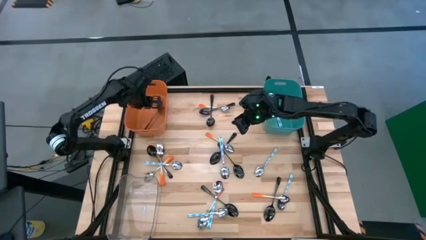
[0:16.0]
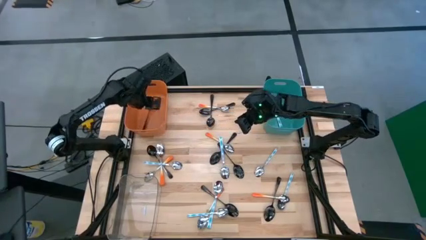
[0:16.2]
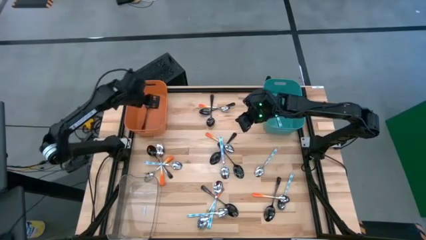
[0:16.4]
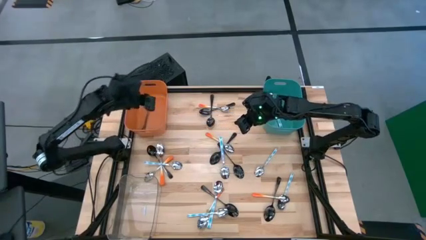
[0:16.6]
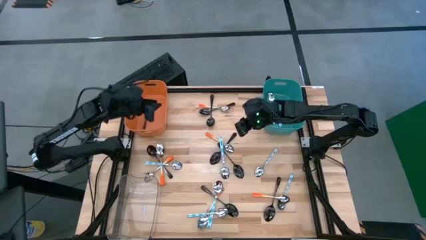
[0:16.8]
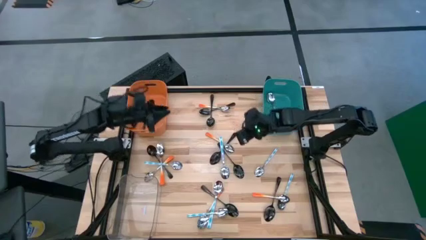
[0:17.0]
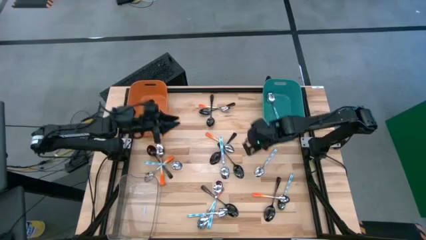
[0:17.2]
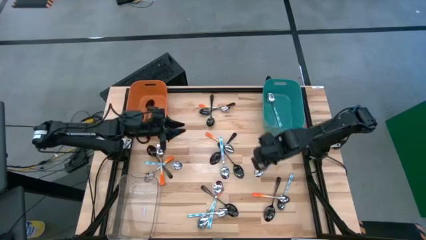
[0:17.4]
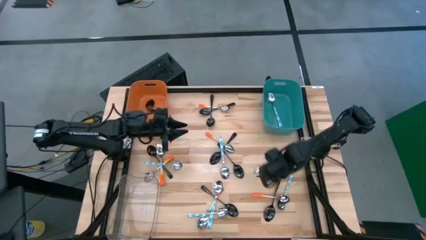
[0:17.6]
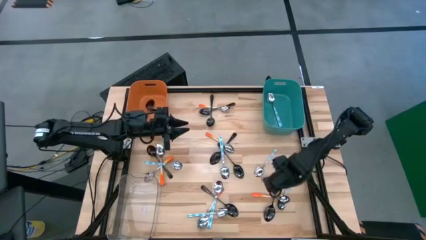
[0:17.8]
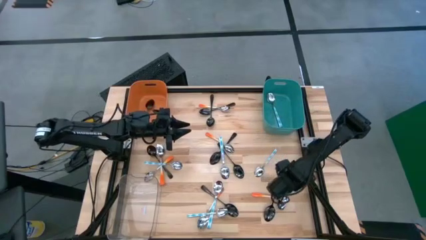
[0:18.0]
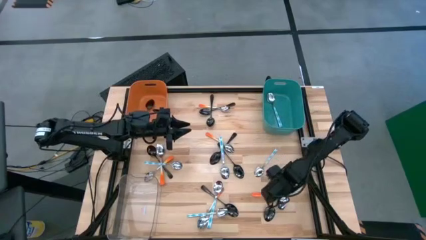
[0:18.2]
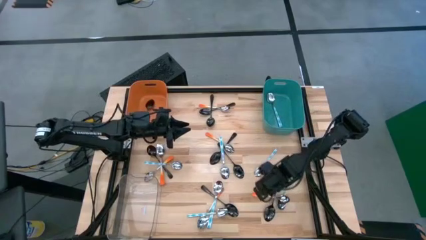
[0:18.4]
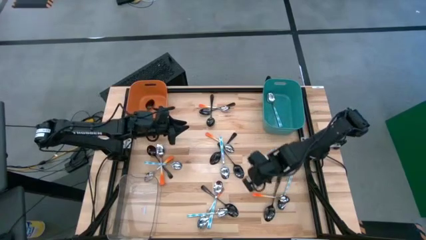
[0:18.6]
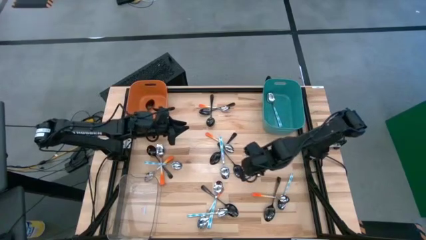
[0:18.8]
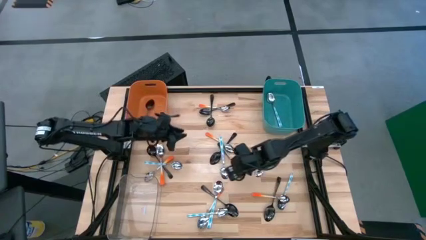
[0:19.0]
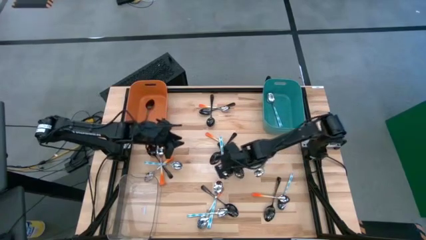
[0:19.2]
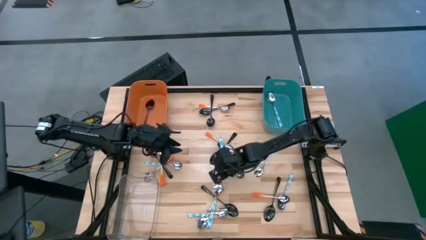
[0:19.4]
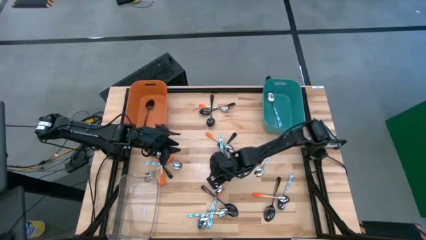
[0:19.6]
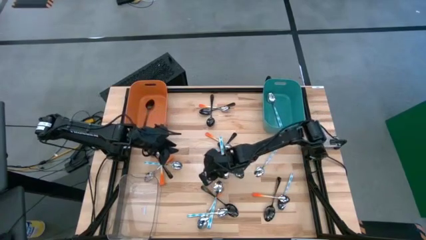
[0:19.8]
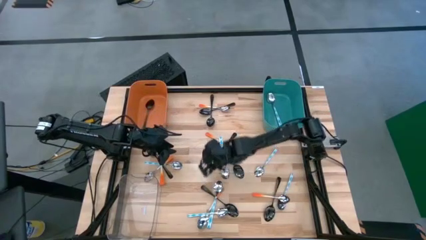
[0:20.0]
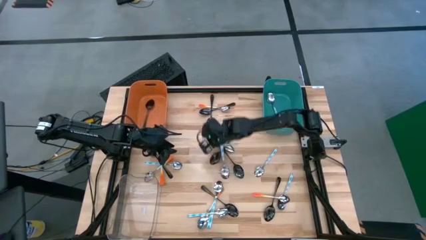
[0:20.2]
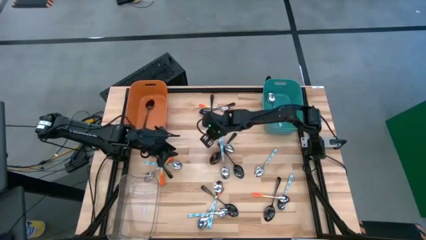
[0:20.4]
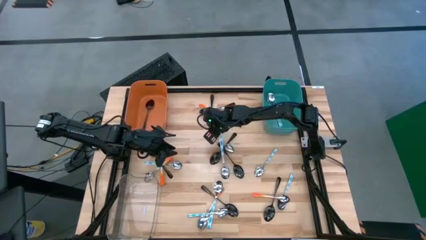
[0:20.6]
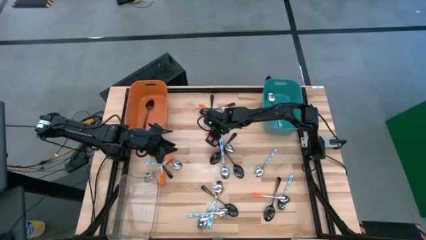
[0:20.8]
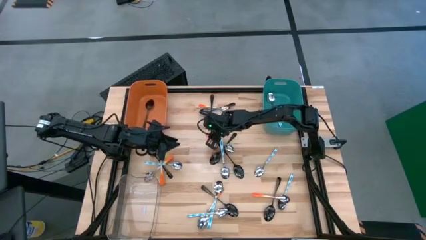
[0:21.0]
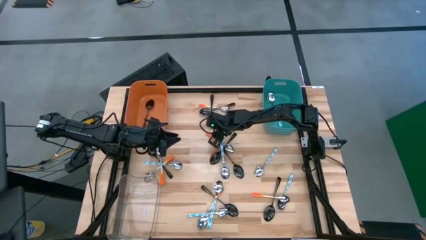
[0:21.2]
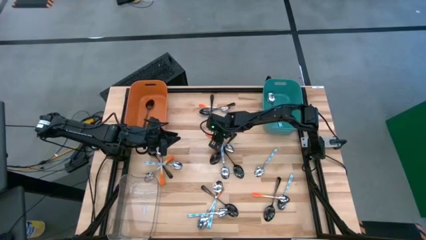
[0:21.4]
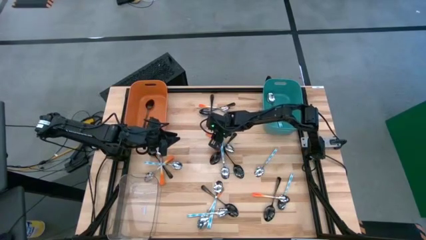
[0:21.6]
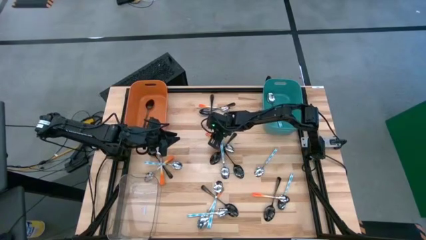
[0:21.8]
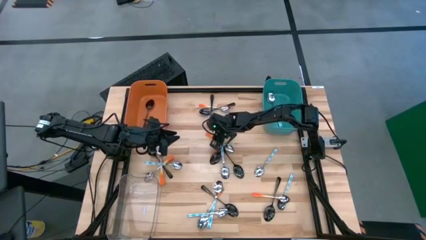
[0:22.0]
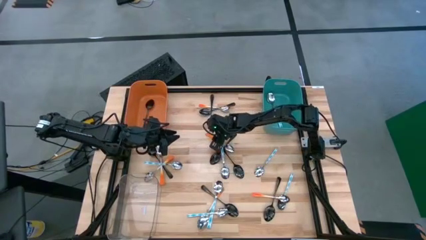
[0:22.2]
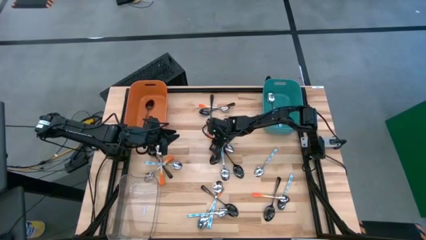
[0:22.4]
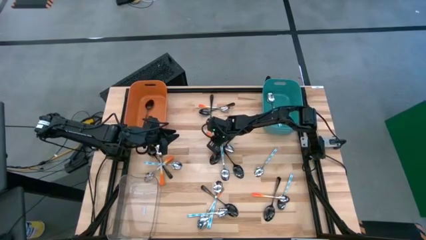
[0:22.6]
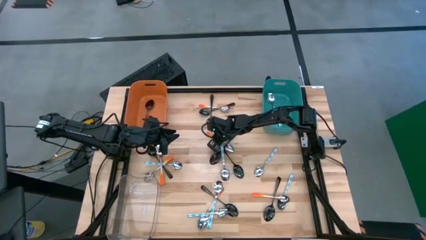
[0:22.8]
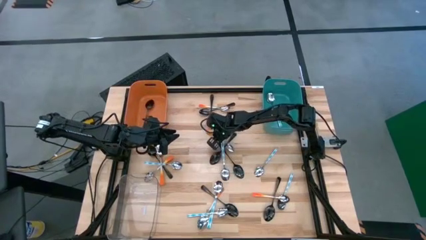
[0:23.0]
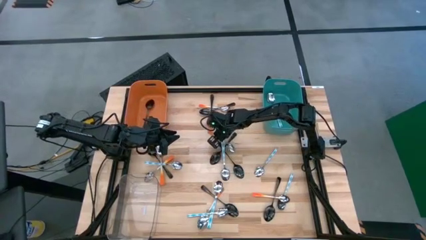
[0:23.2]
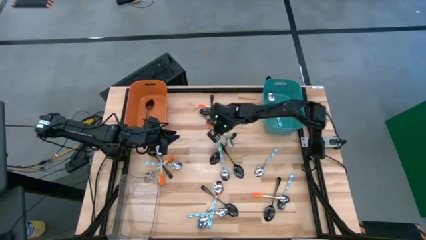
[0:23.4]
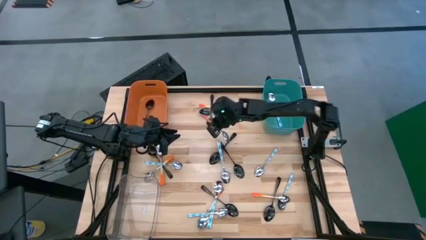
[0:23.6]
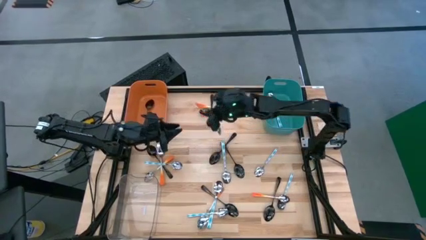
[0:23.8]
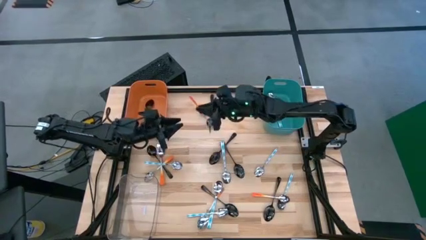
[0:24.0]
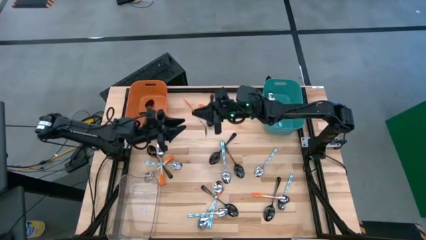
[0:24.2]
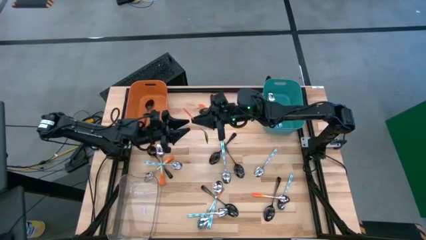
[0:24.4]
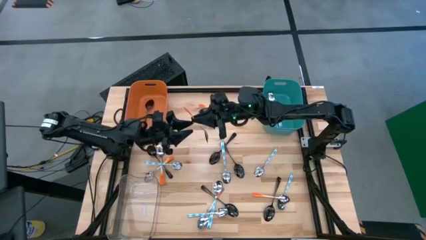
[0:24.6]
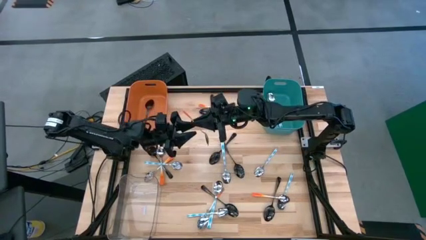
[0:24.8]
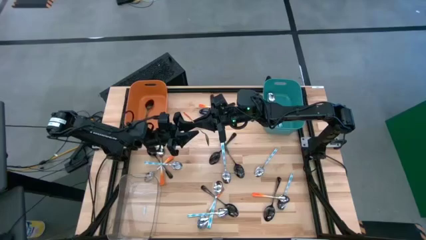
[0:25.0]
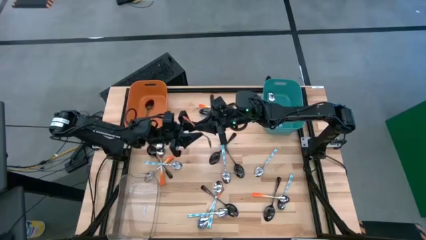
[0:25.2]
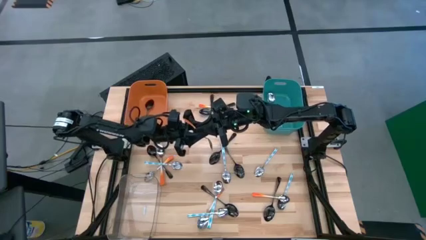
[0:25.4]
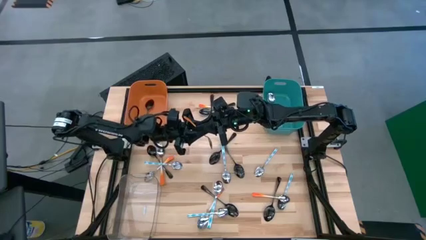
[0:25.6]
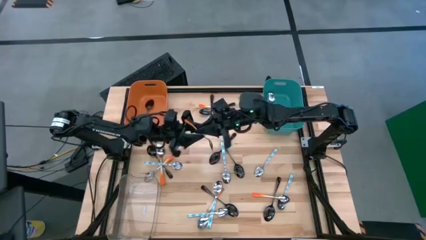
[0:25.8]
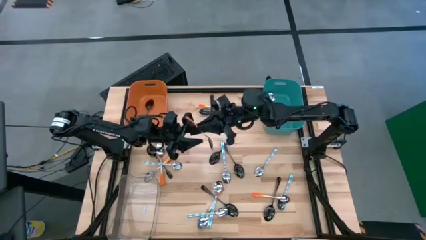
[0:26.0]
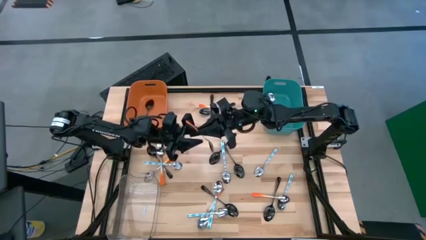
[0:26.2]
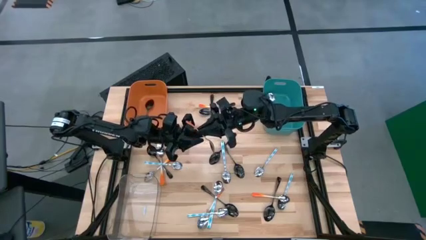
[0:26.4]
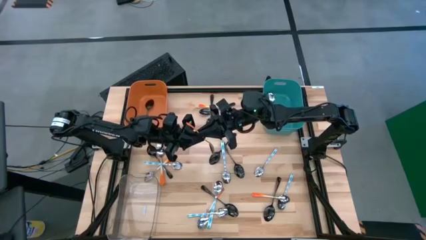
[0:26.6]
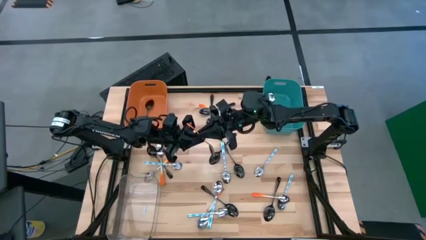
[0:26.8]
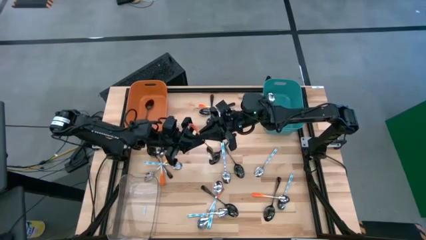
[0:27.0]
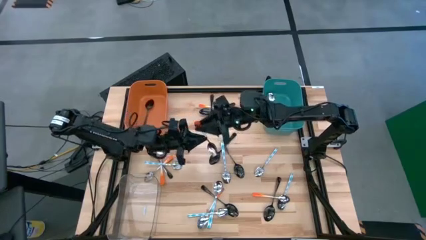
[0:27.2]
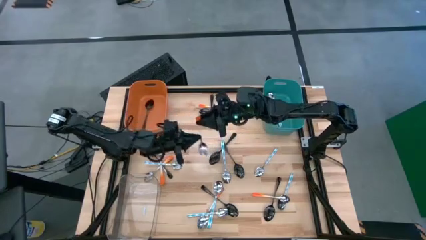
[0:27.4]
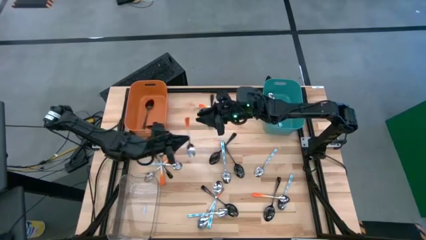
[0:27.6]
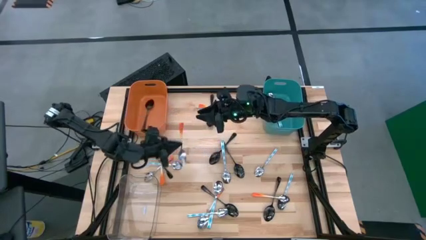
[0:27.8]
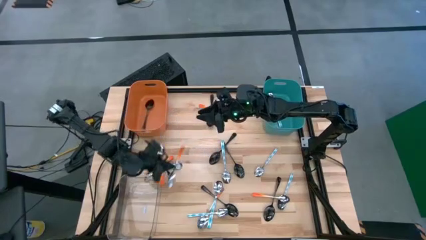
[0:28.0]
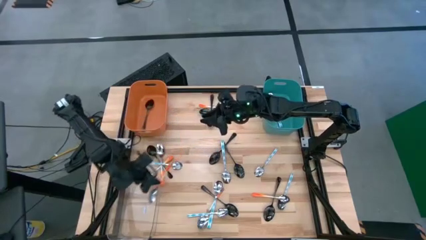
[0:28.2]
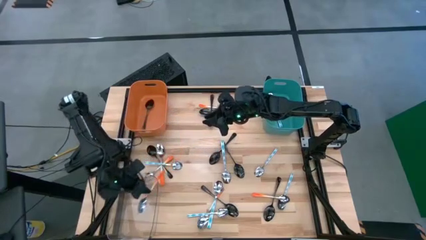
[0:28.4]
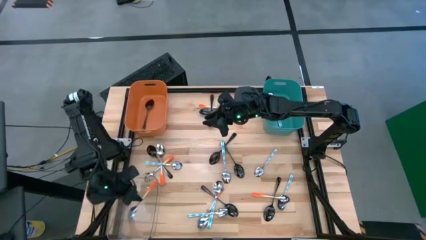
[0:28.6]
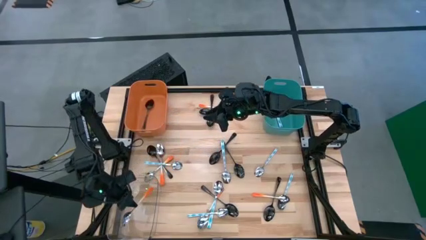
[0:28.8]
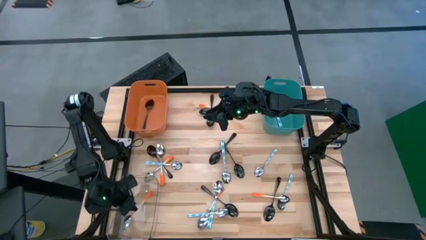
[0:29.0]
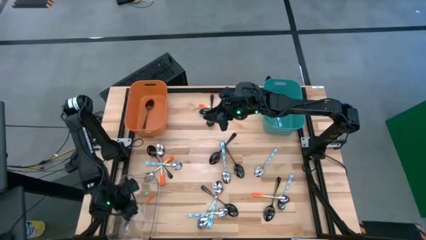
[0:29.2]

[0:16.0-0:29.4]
Task: Sort silverware by color (type)
Put the orange spoon into the transparent bin

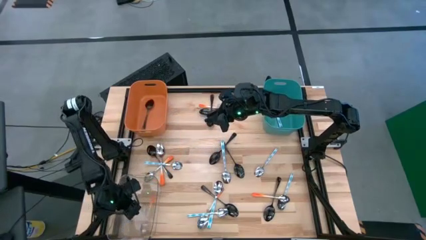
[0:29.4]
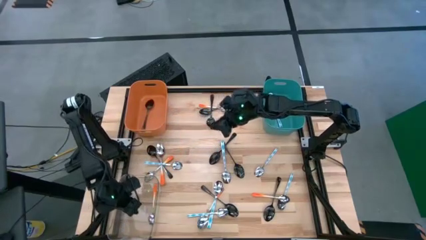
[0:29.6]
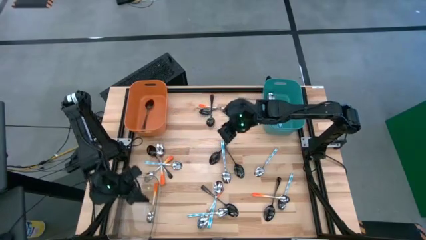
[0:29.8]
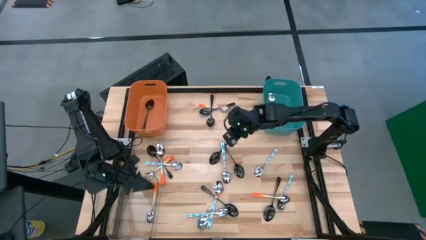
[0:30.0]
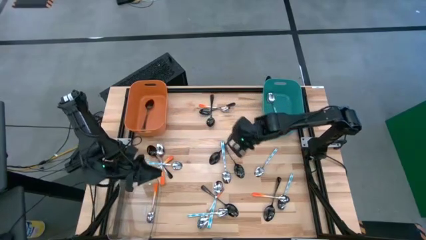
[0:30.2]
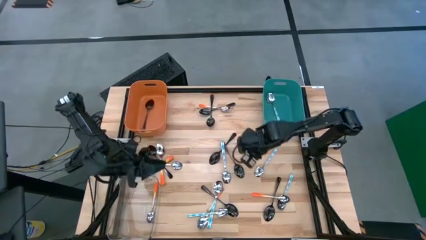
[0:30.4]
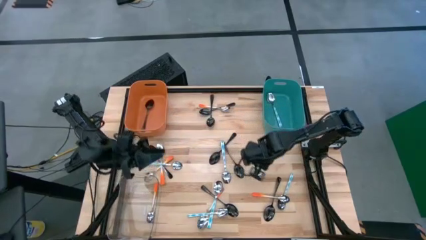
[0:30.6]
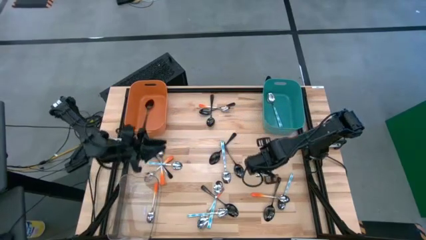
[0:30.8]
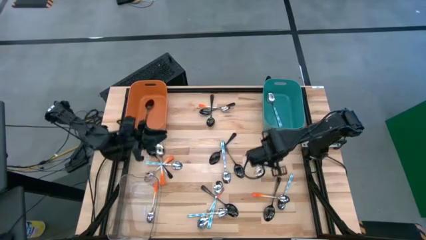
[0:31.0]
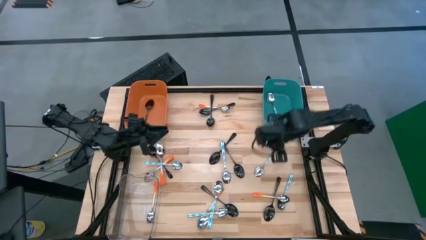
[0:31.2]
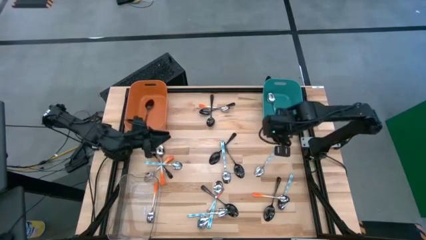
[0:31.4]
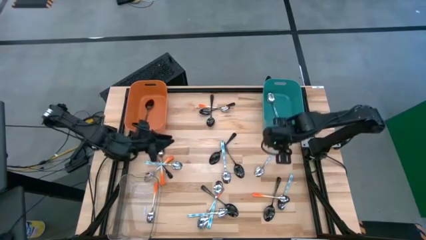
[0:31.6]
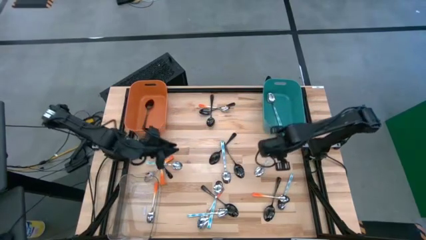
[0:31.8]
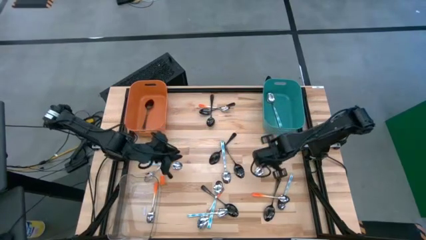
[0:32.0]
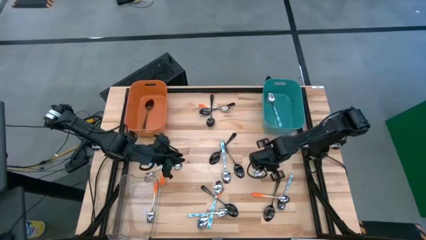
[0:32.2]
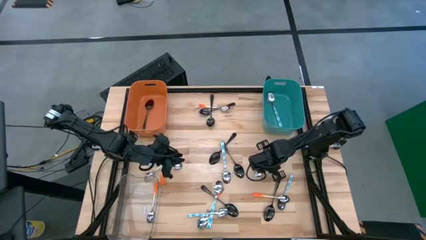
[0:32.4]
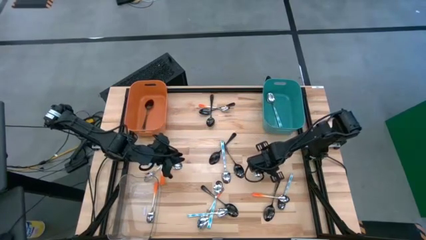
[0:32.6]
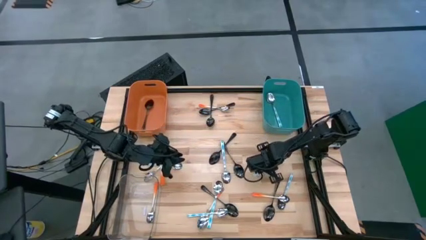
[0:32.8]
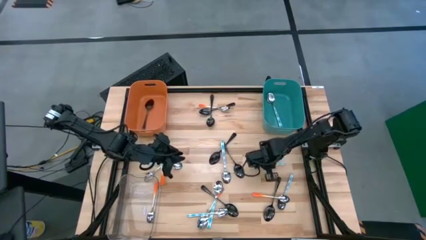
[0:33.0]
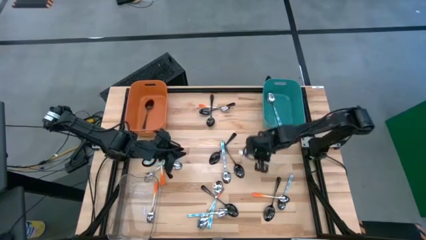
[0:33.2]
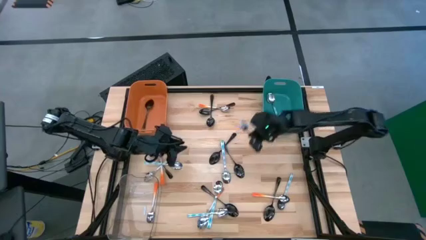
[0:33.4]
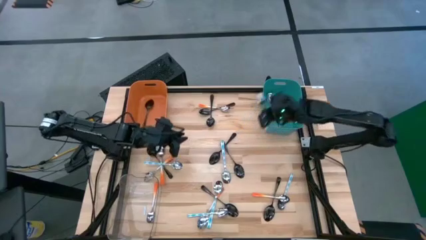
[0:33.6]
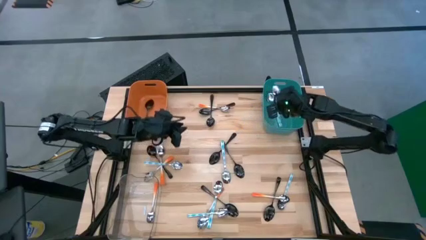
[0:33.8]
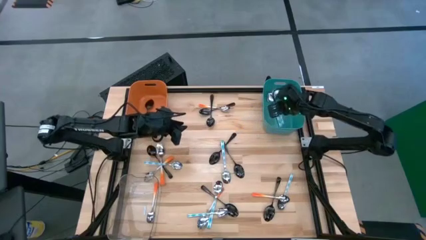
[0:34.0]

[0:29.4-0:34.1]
Put the blue patterned spoon into the blue bin
